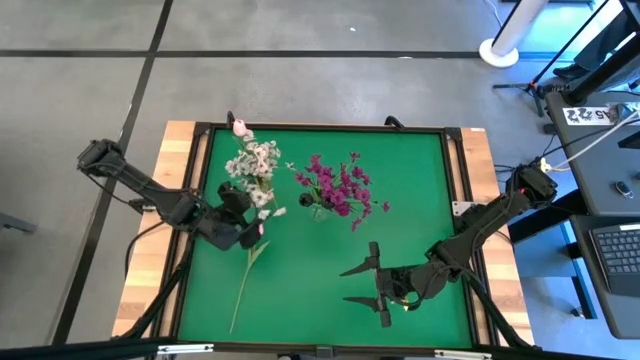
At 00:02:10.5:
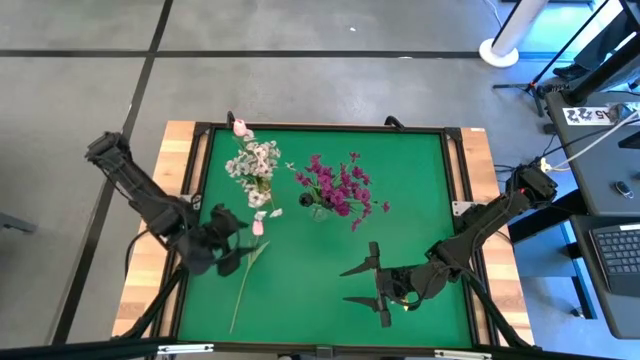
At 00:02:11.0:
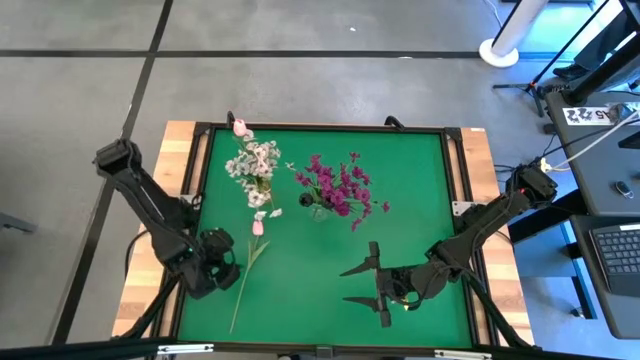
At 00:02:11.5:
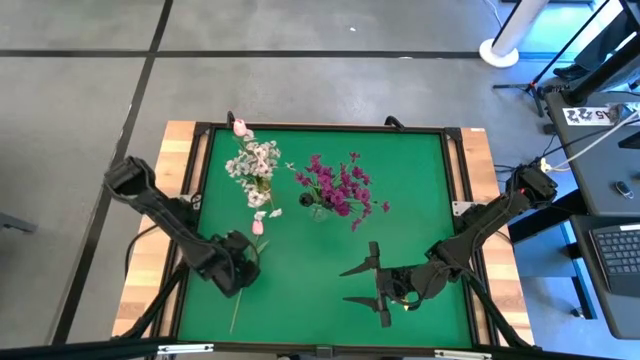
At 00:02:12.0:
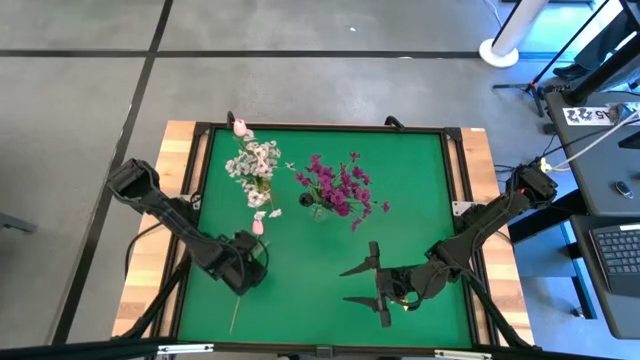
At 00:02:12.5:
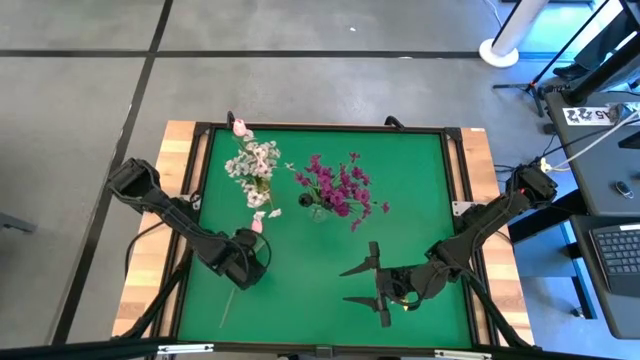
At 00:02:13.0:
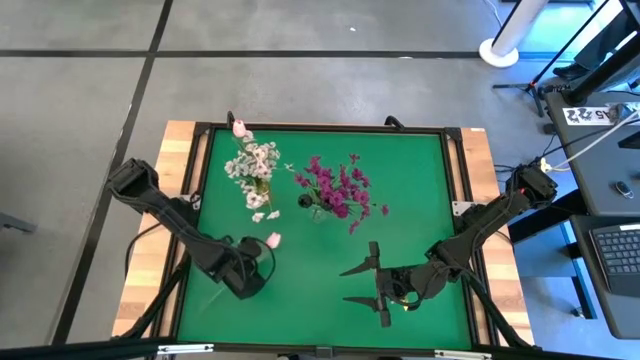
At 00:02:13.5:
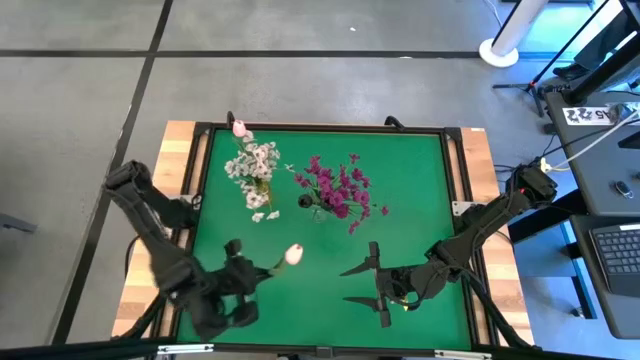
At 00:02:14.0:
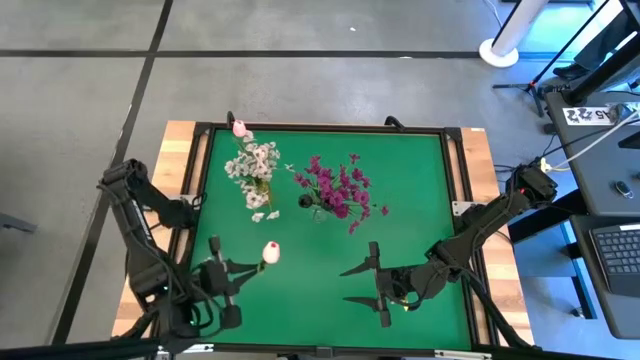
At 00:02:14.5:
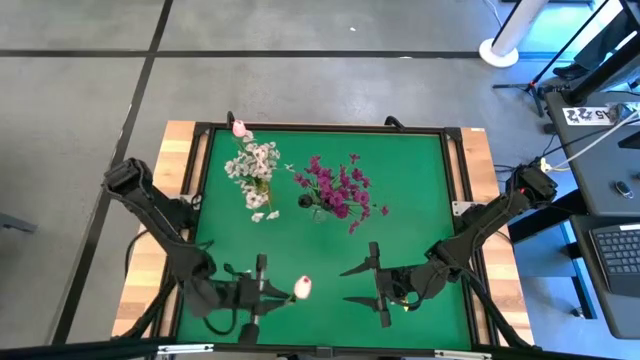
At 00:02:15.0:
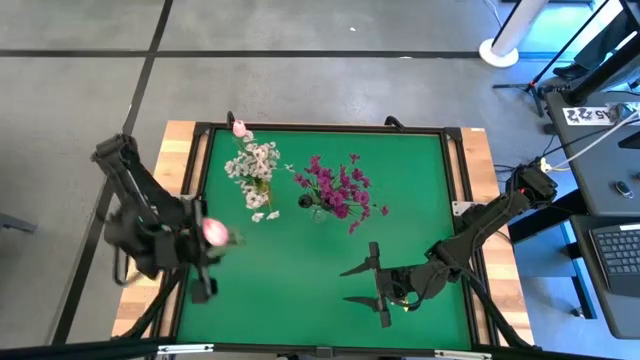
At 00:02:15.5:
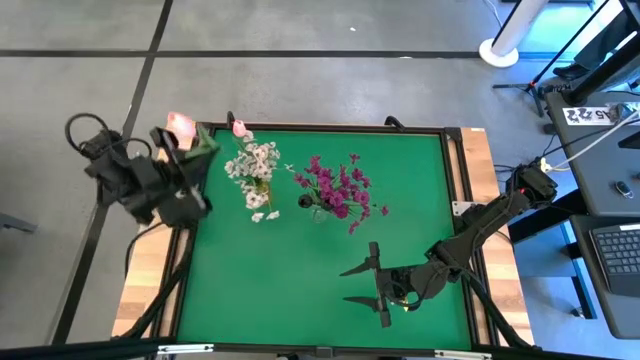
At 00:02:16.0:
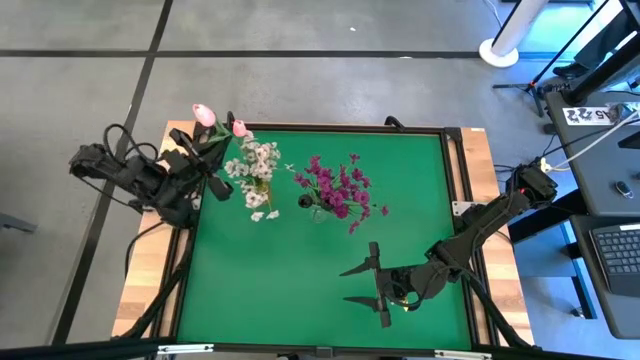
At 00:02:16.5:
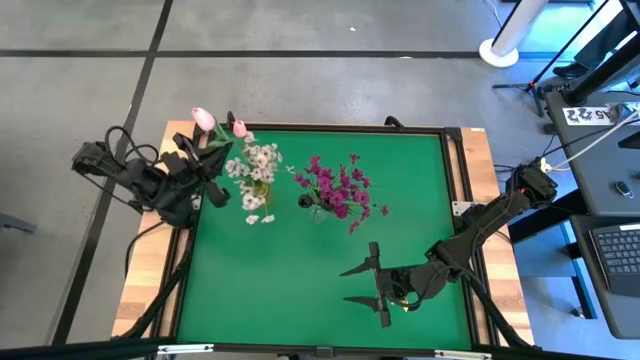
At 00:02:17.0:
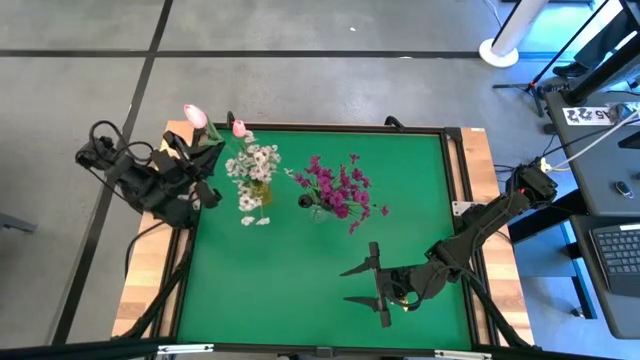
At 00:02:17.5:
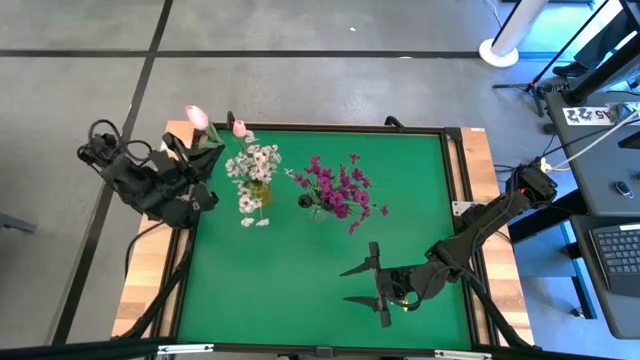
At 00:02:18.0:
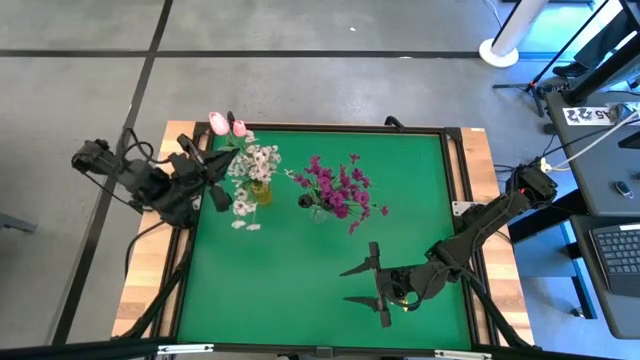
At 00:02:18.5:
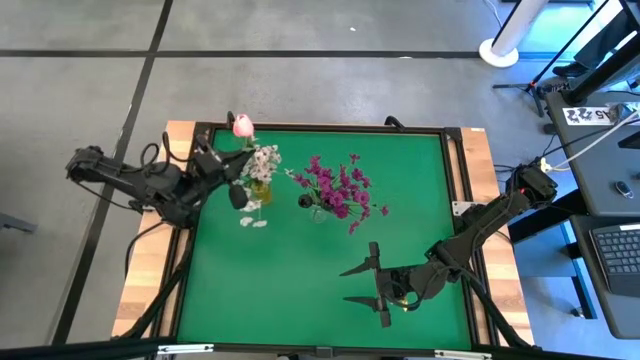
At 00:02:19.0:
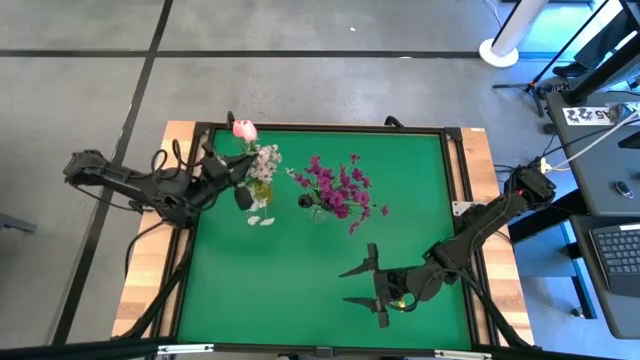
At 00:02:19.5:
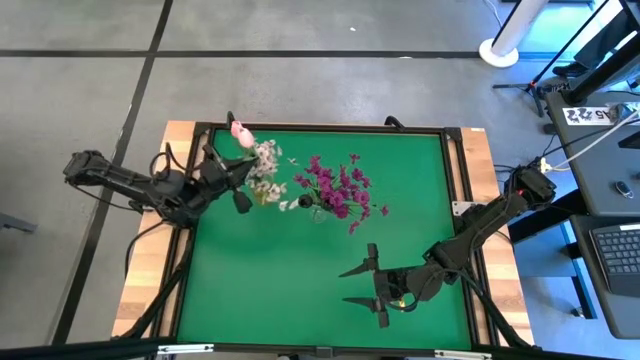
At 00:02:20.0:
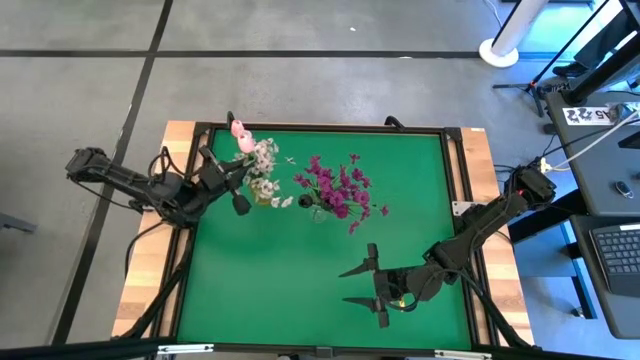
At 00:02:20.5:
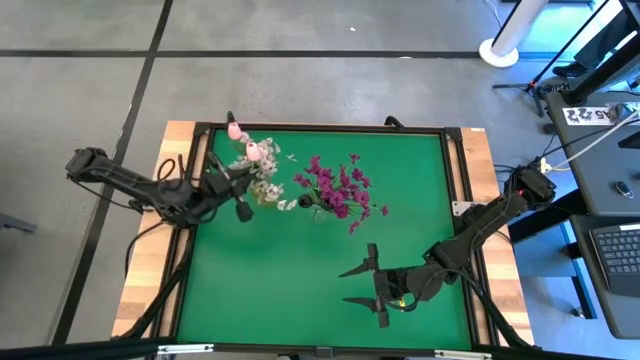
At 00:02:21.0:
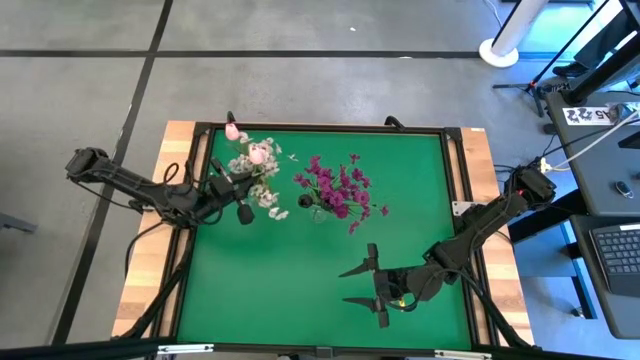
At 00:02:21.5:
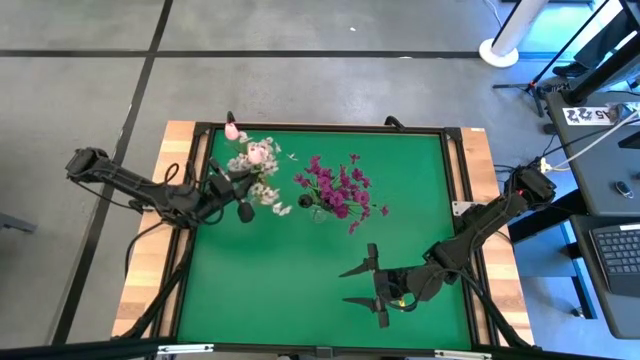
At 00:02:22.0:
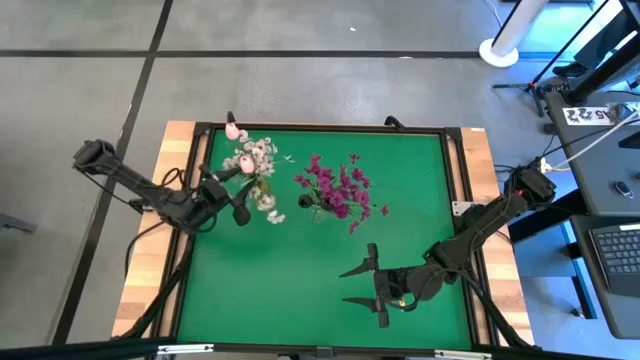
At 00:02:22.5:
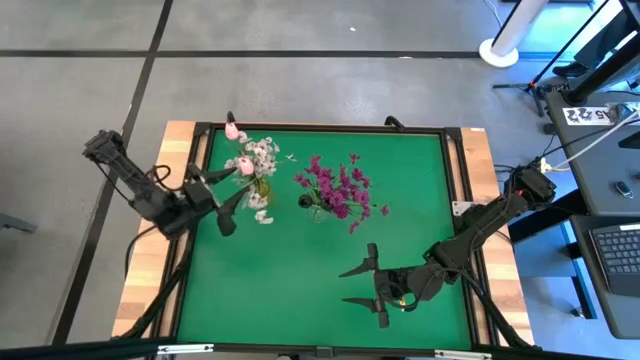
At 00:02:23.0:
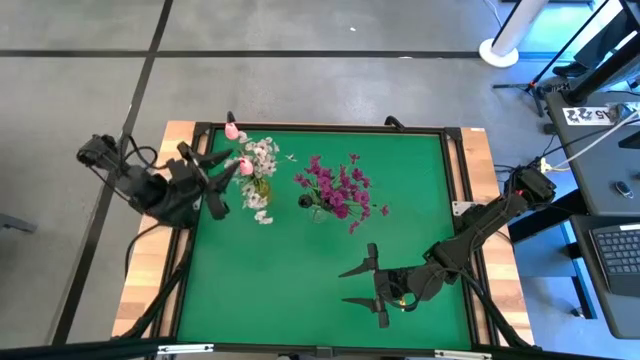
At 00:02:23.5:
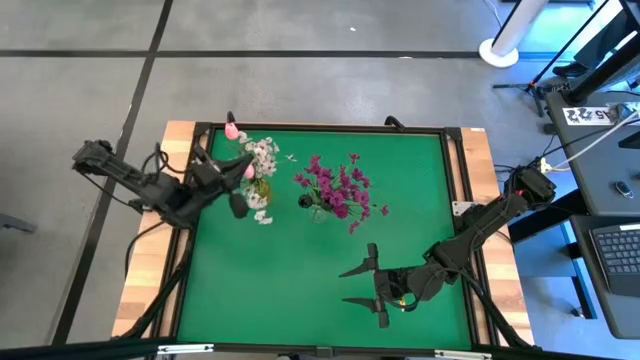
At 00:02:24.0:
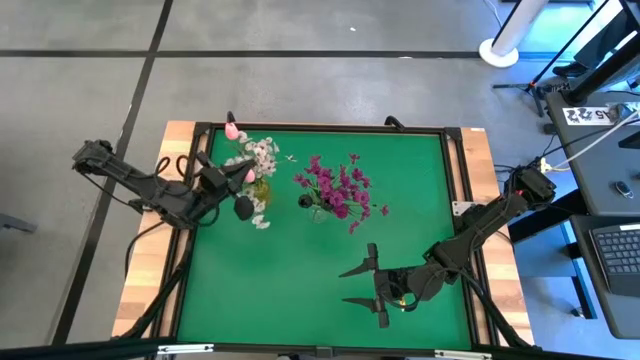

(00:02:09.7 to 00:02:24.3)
Task: Sort flowers into vase by color
Put the pink tulip into the yellow vase

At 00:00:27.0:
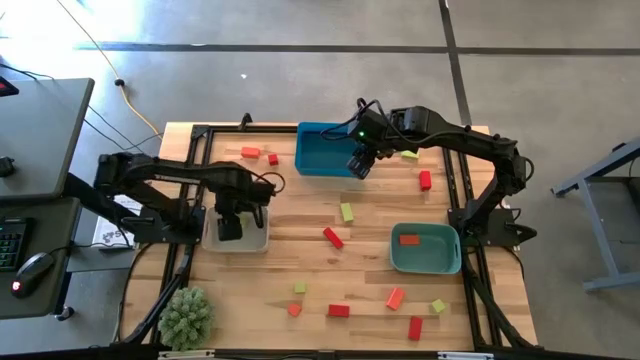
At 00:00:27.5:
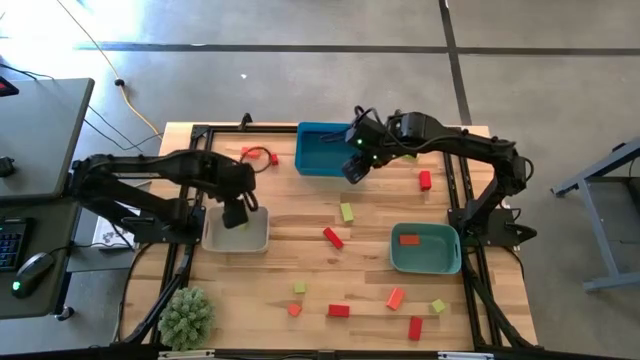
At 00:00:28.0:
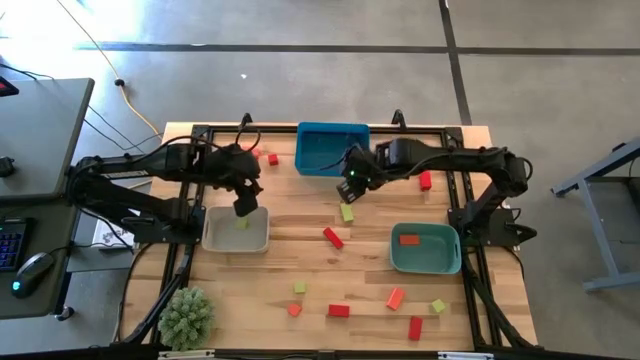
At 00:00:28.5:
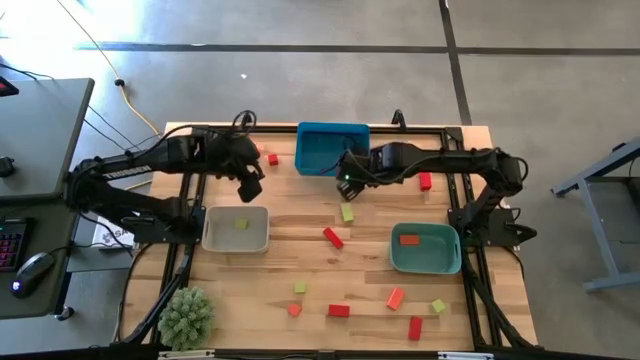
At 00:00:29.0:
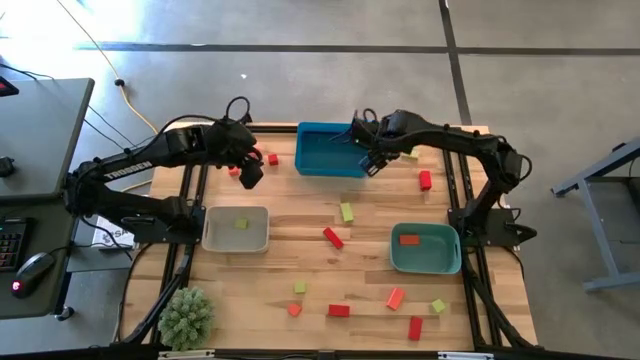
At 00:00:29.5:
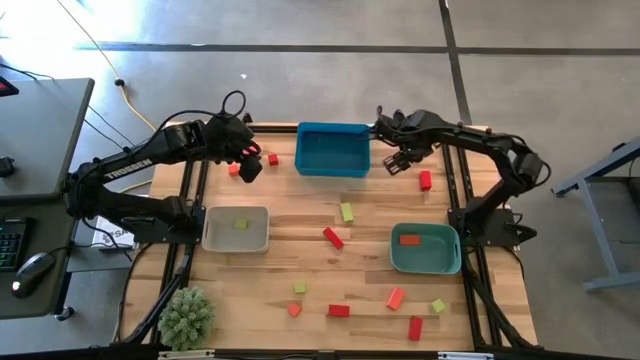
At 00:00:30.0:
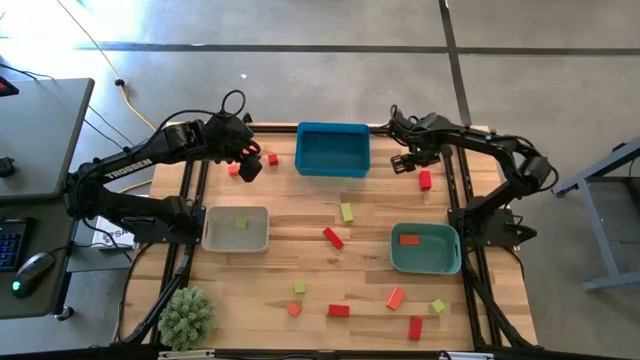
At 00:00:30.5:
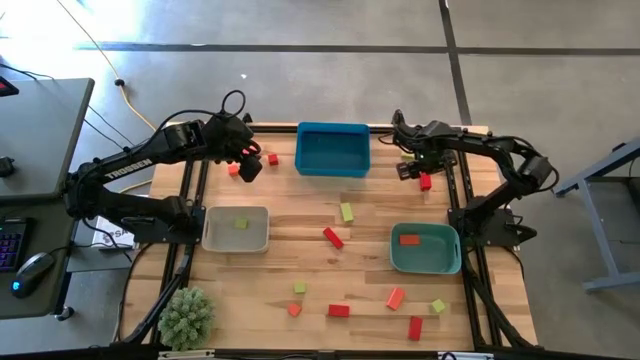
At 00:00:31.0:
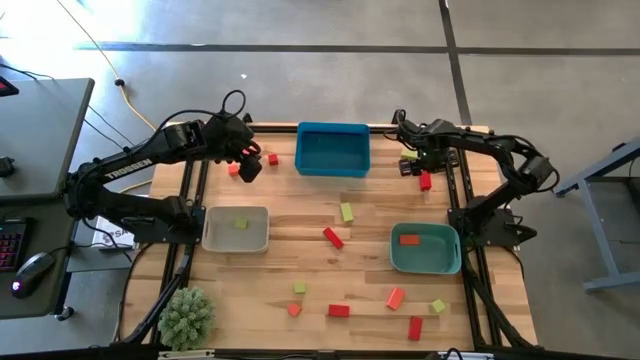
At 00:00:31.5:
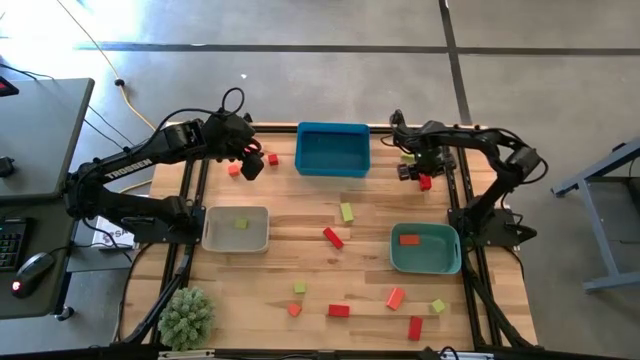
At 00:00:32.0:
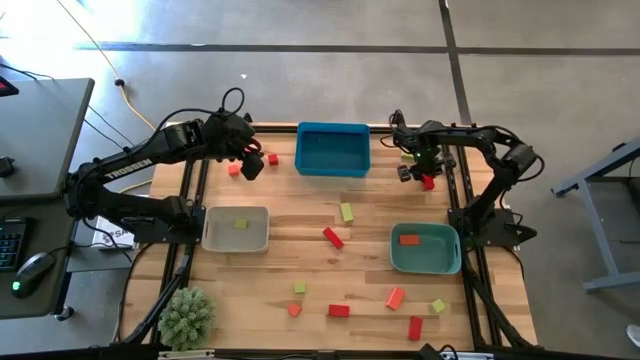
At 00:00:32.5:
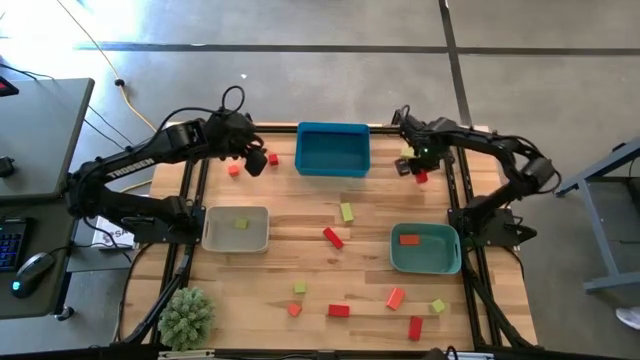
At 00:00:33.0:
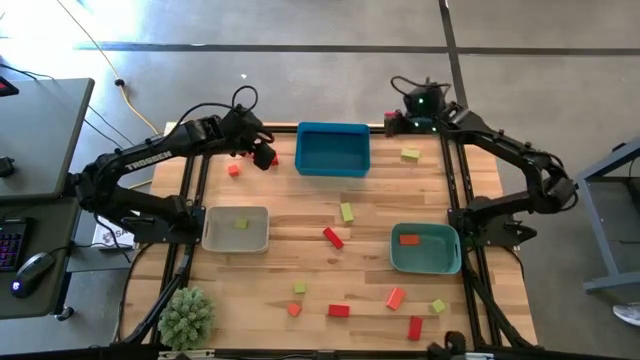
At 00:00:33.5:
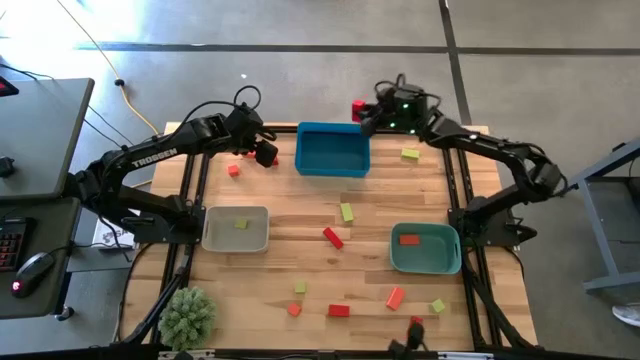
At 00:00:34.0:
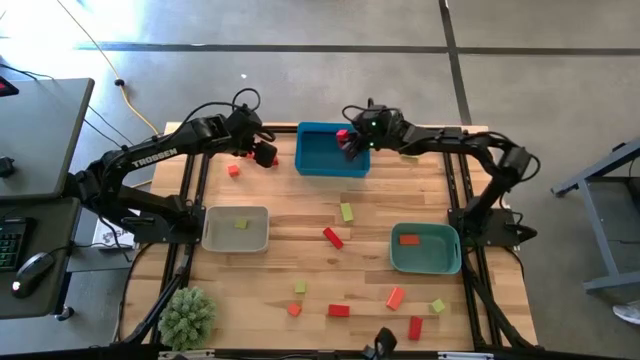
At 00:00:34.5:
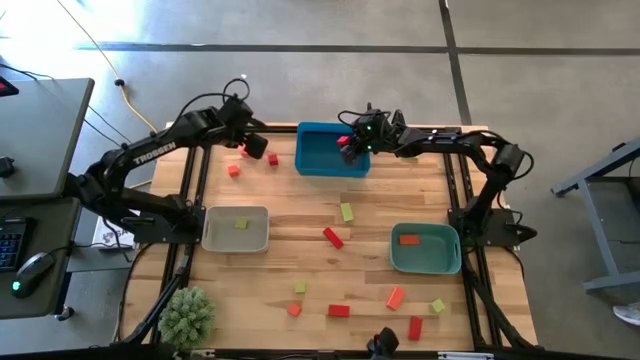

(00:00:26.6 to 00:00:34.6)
Task: Sort & place blocks by color
Put the red block into the blue bin
